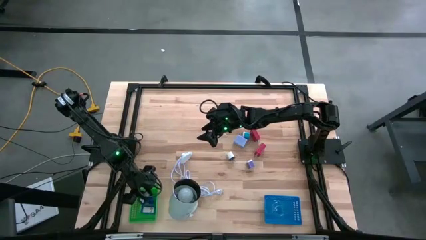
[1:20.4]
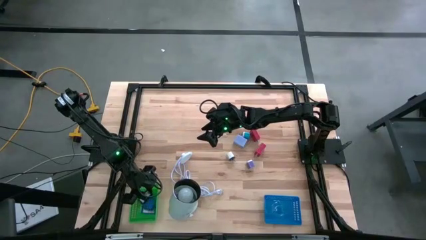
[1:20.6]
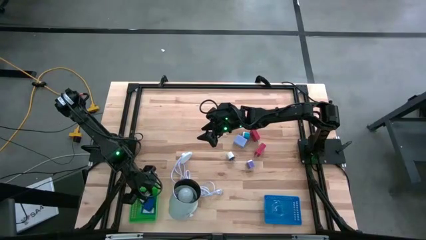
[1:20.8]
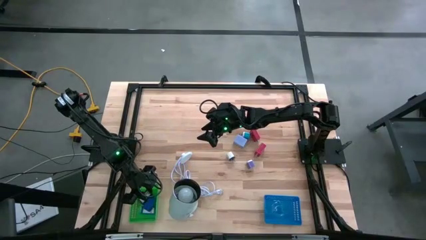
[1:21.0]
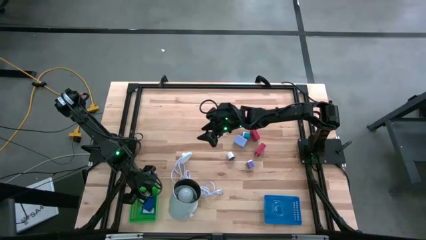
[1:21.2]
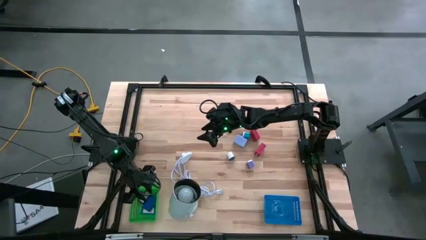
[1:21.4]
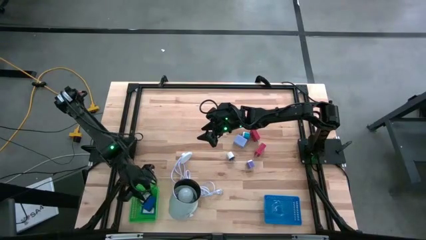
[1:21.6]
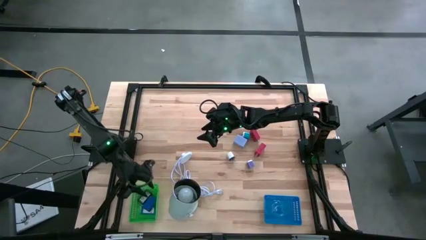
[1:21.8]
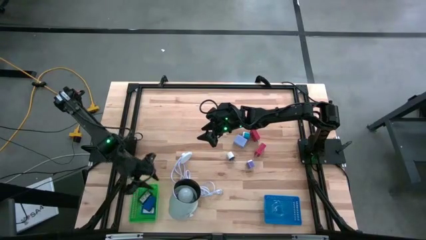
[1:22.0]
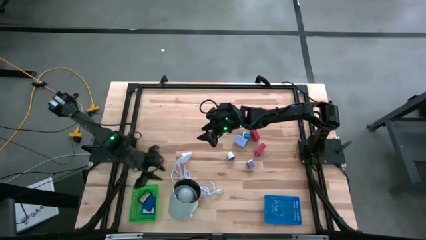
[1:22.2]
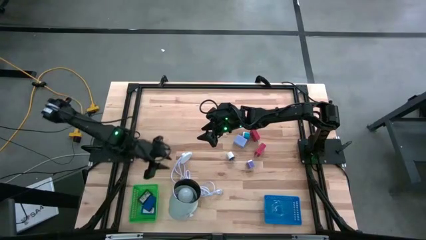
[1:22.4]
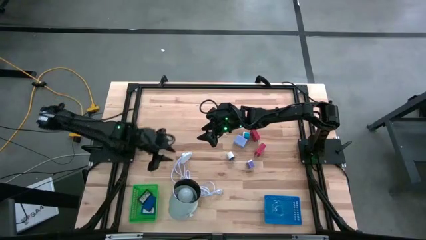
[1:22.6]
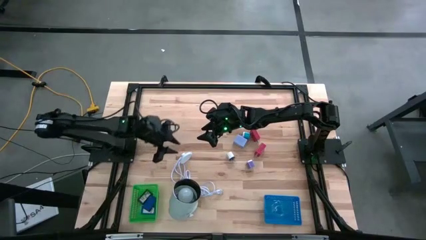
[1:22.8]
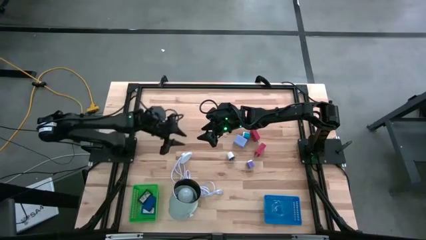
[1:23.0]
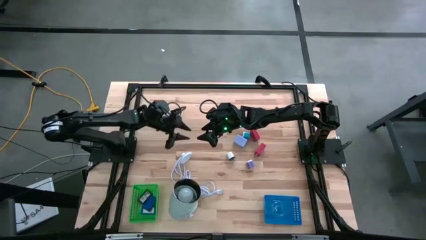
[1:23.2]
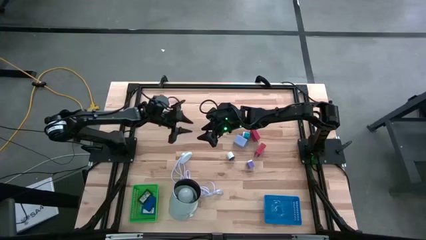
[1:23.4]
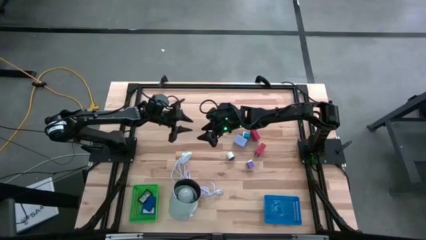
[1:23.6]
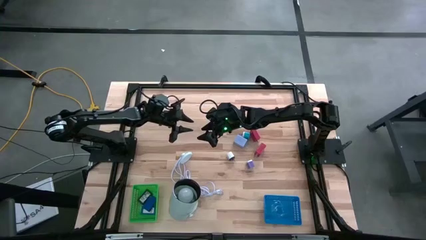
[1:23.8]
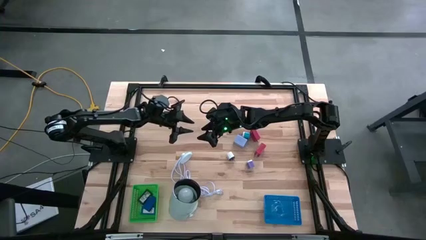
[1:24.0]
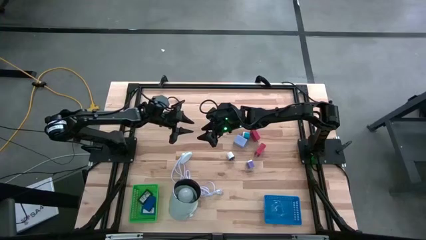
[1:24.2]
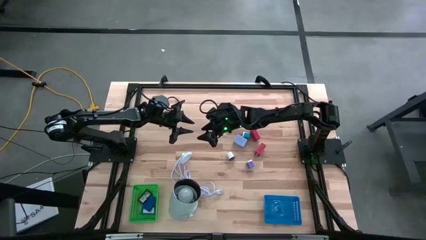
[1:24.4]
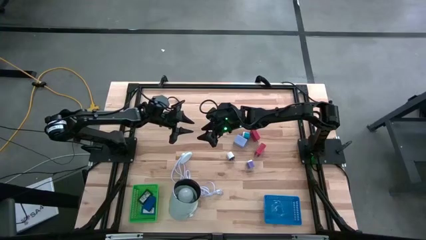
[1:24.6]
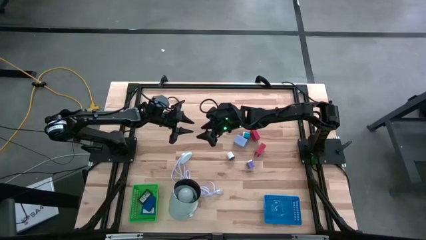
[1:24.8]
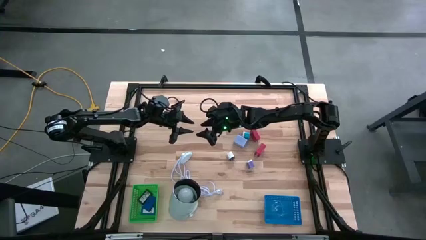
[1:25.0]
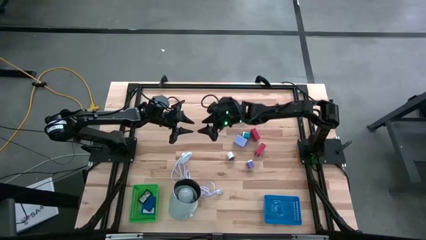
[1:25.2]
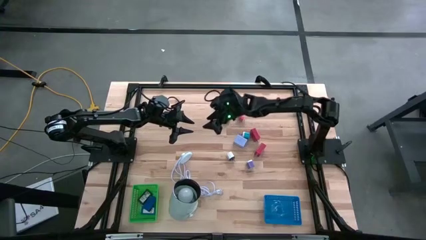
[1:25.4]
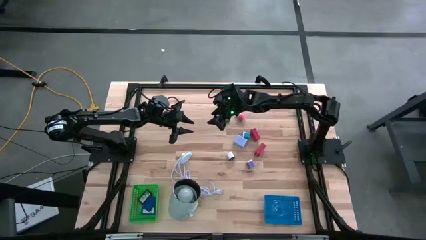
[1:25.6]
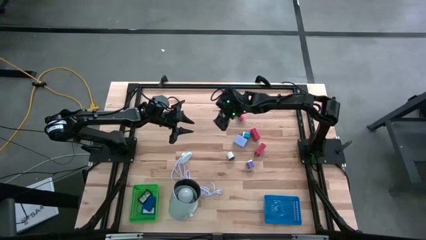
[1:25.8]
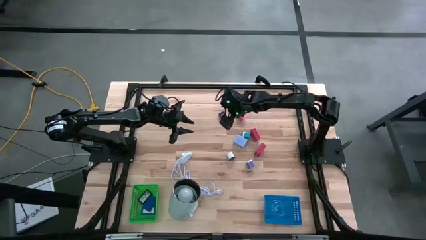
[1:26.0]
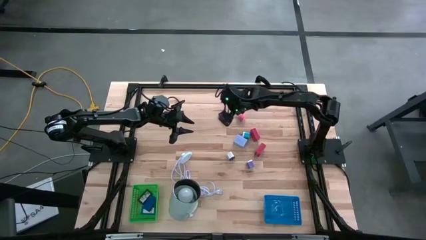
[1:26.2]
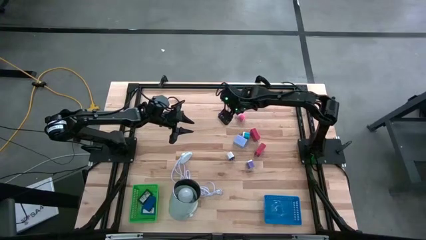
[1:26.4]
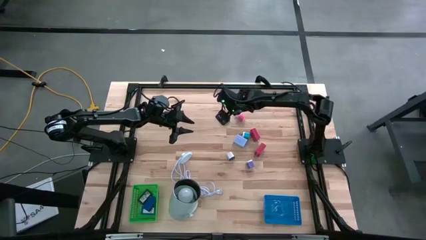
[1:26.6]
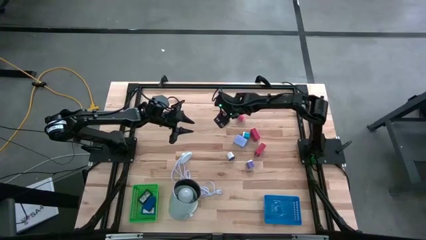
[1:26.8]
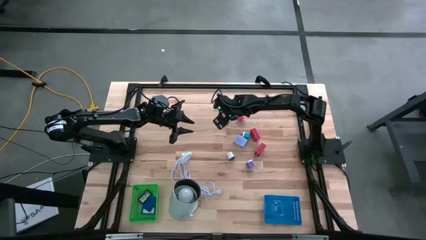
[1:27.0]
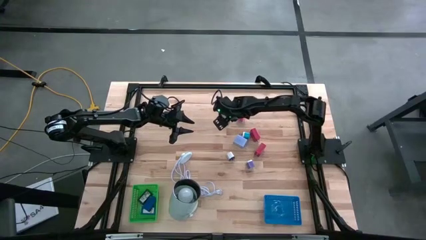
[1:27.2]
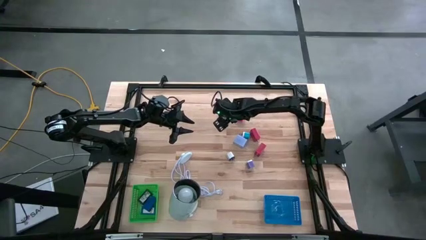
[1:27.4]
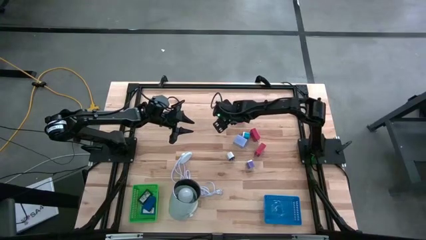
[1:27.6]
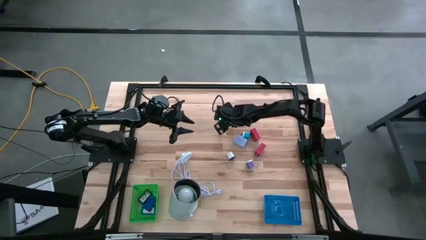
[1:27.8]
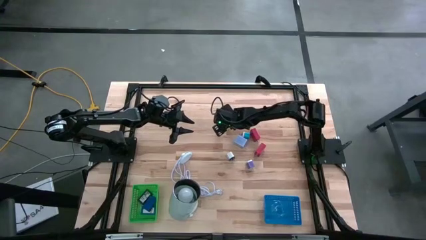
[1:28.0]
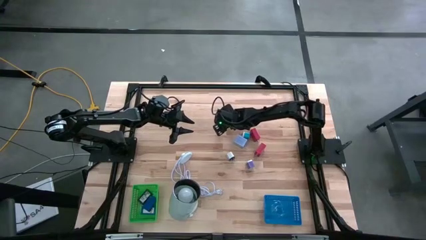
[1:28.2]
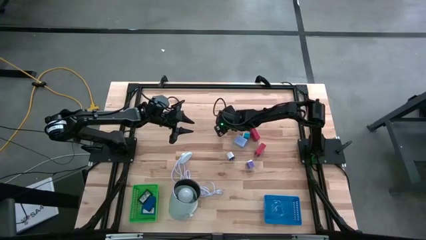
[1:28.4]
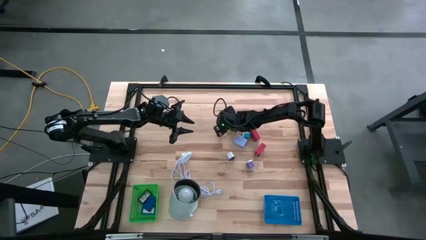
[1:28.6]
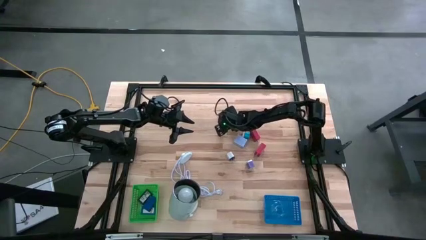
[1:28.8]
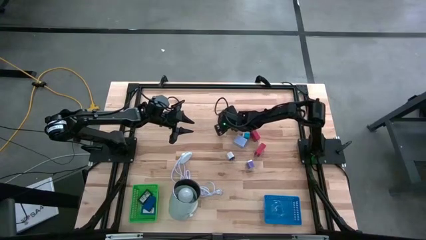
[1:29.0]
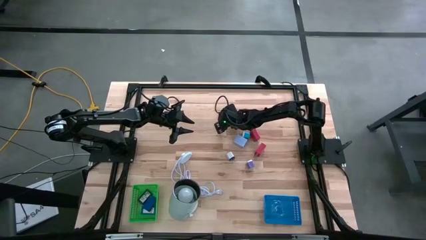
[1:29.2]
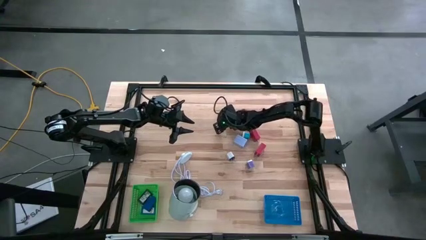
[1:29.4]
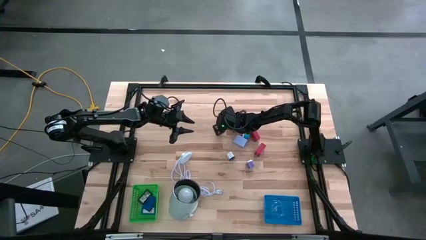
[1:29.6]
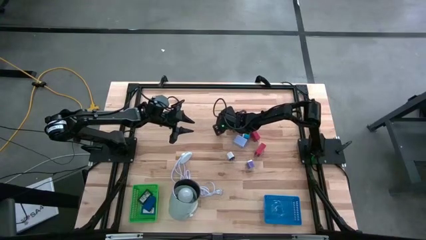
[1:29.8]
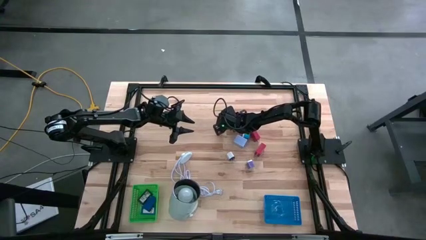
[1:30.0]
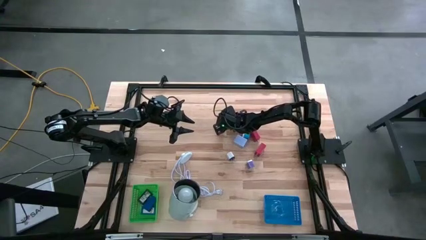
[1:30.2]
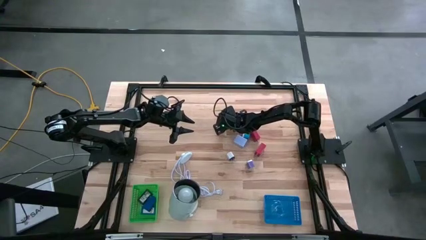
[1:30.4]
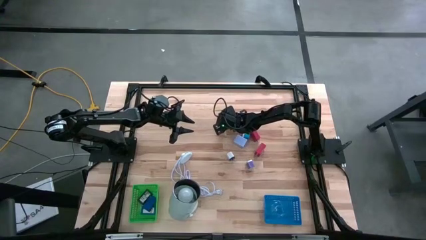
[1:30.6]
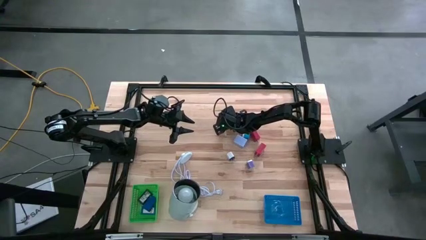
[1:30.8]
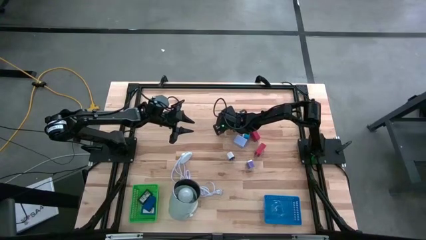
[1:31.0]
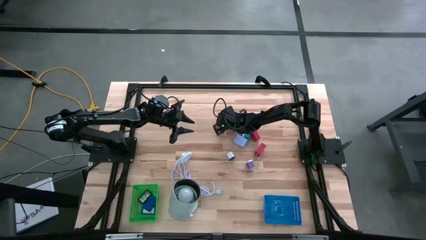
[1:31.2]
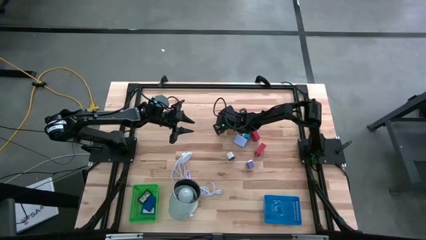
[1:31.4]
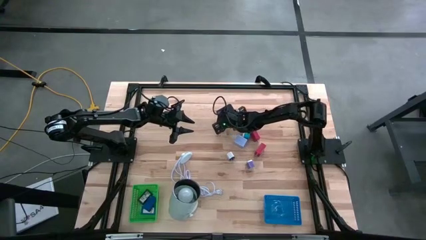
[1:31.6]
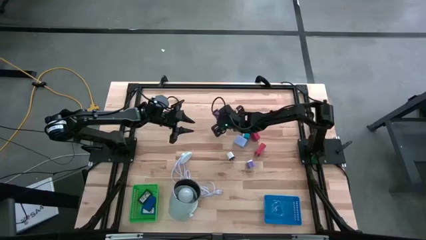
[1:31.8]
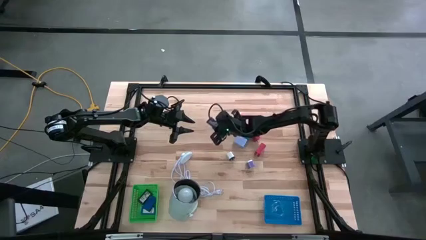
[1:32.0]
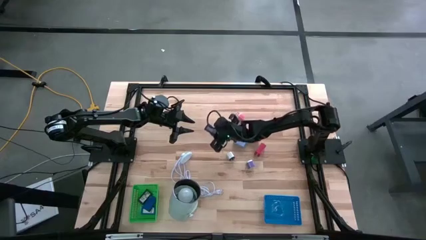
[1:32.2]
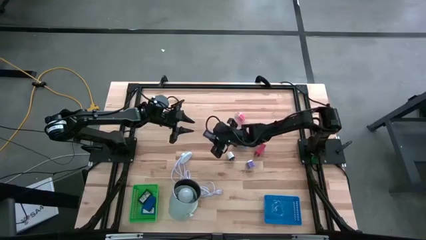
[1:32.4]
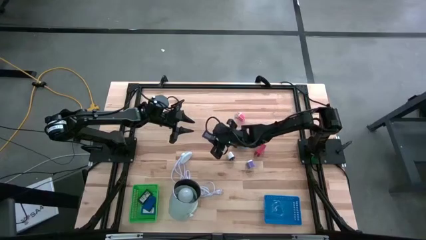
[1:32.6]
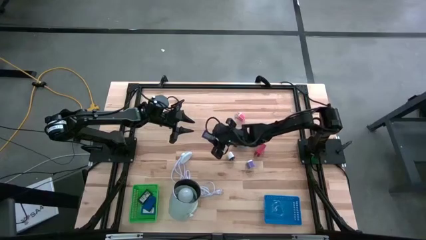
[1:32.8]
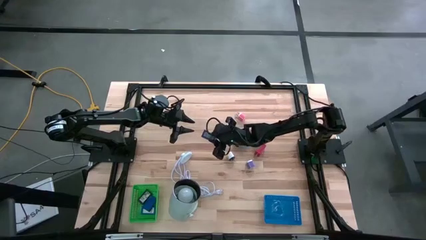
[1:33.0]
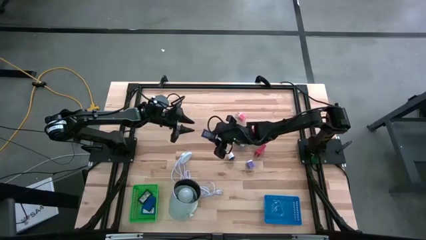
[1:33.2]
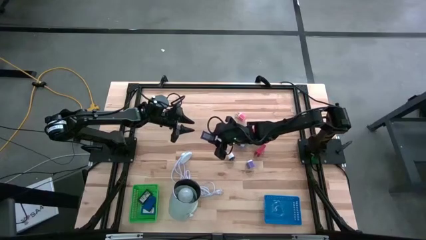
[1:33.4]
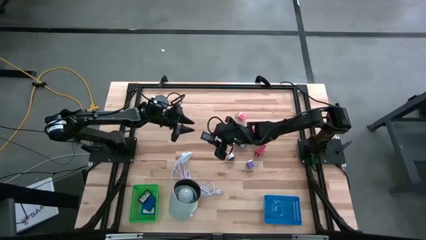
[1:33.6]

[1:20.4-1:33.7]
Task: Pick & Place Office items
Put the dark blue digital timer into the green basket

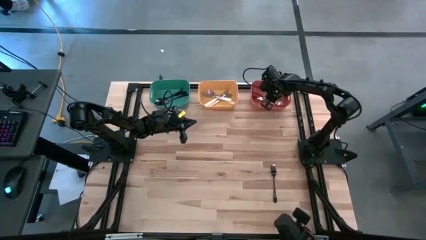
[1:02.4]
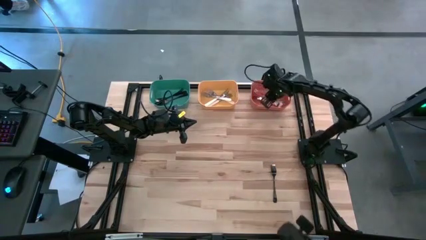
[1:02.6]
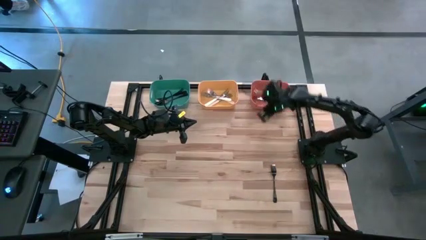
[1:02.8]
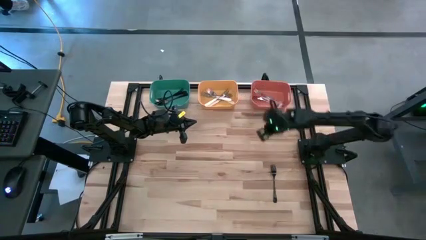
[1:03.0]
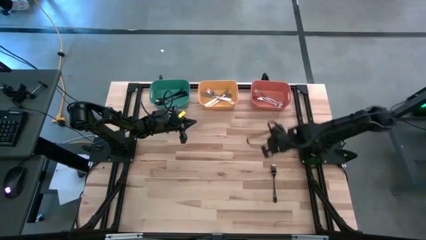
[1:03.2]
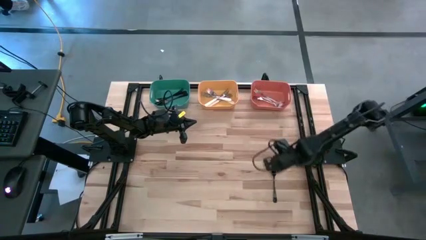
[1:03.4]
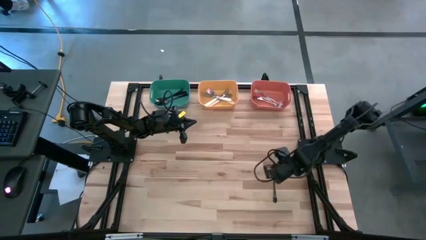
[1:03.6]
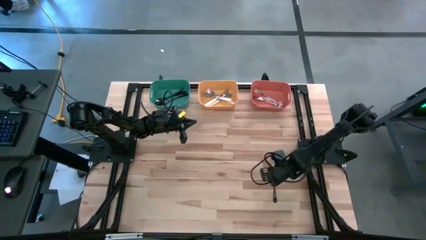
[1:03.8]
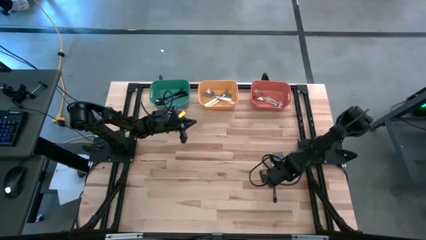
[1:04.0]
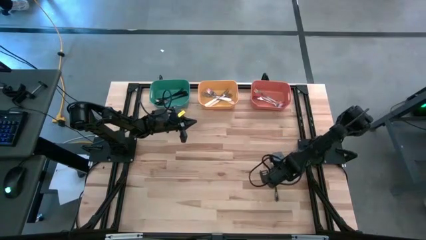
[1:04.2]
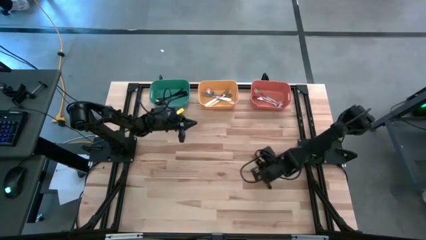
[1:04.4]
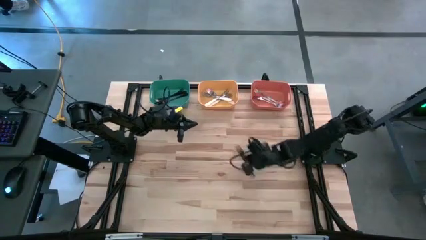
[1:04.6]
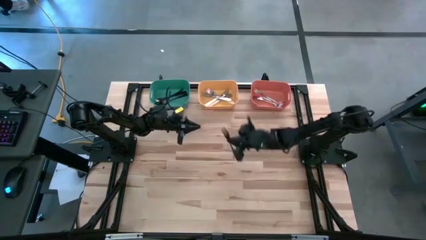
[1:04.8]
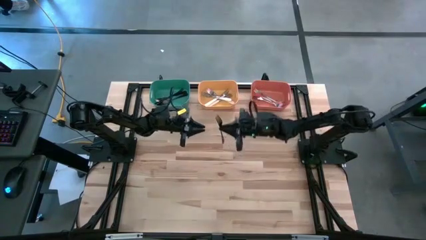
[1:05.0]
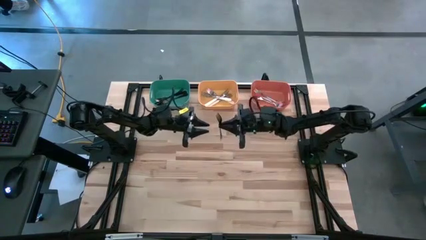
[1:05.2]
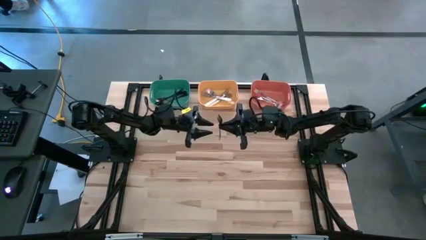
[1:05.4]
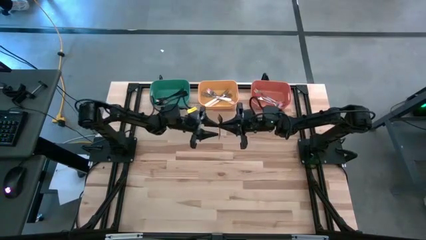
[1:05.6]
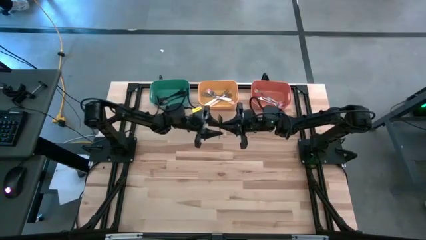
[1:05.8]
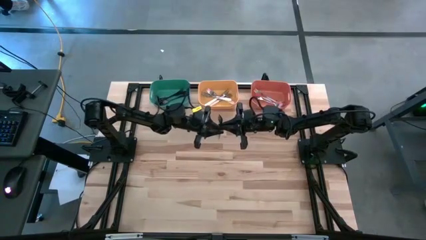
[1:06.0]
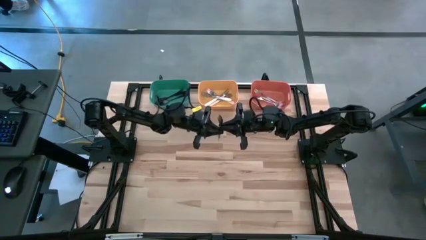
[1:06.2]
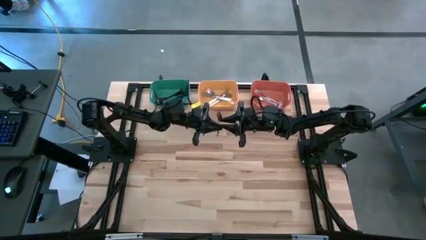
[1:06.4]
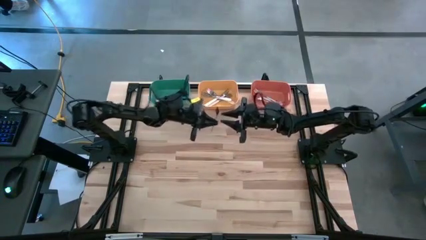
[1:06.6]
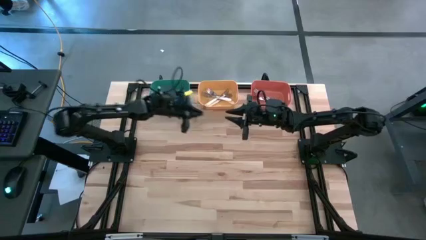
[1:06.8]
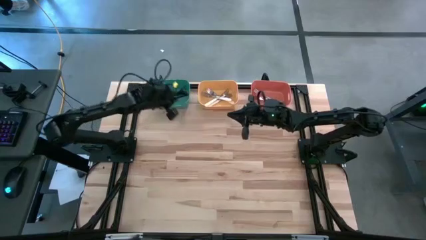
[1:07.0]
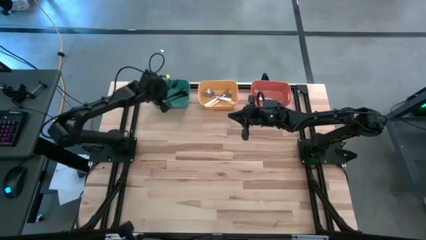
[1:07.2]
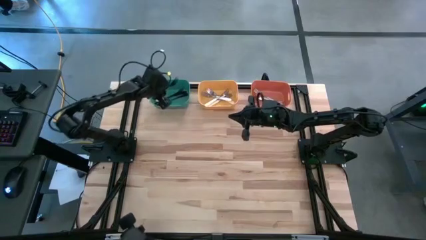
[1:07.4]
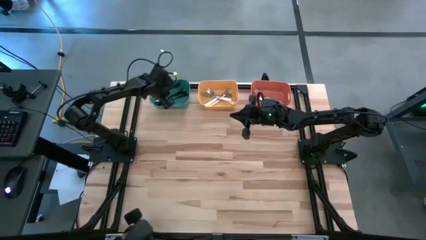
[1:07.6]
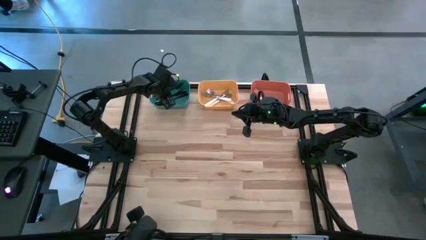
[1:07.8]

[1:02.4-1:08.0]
Task: Sort silverware by color (type)
Put the black fork into the green bin
